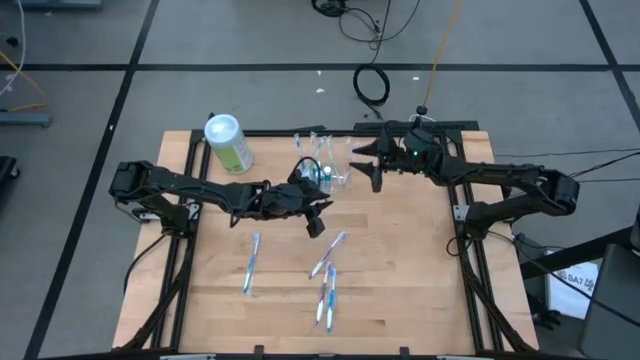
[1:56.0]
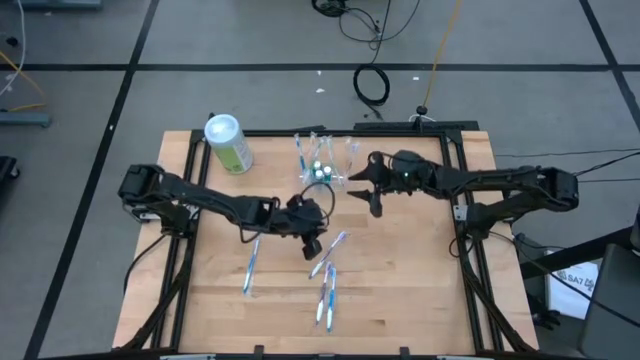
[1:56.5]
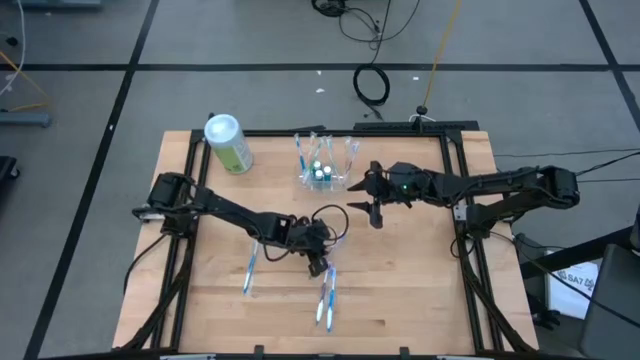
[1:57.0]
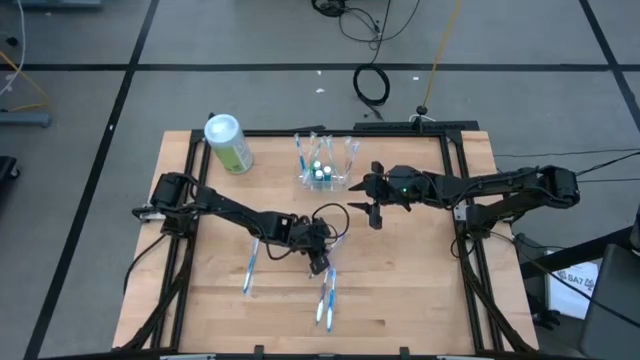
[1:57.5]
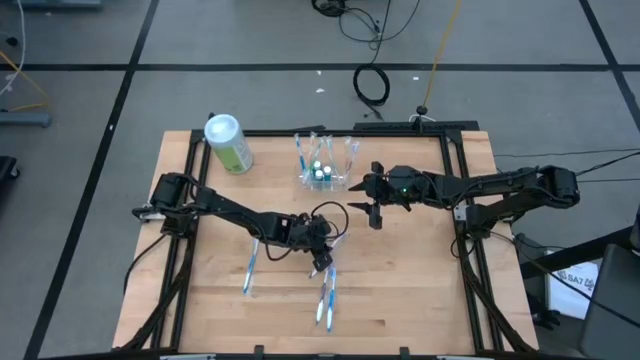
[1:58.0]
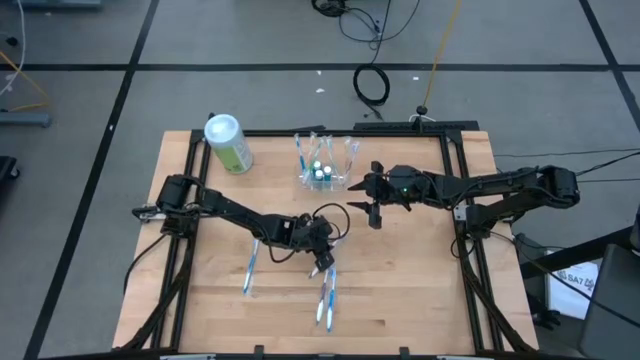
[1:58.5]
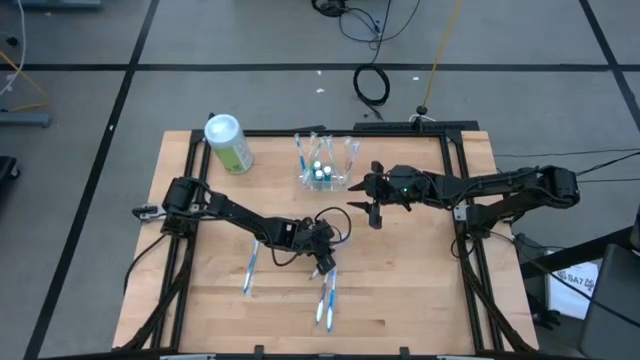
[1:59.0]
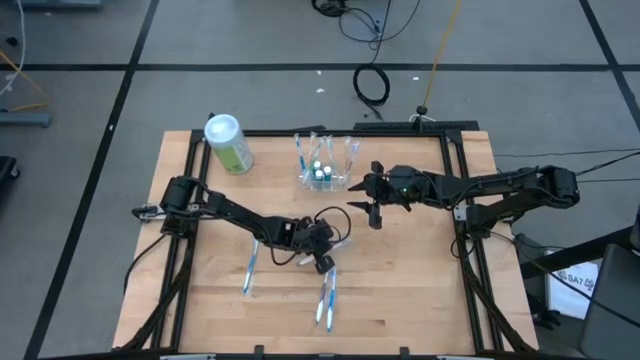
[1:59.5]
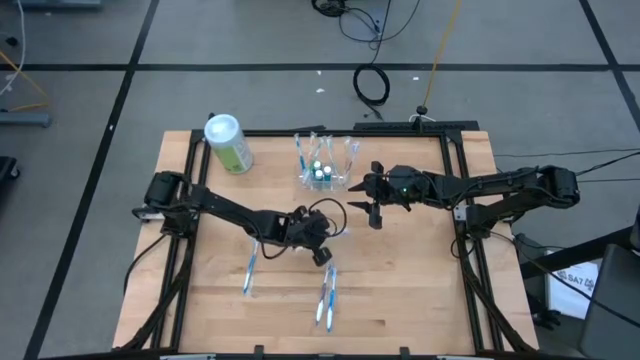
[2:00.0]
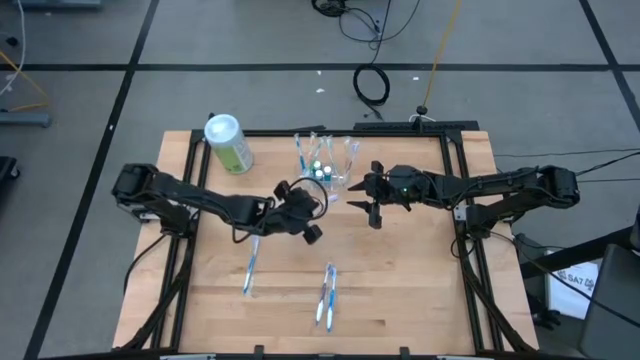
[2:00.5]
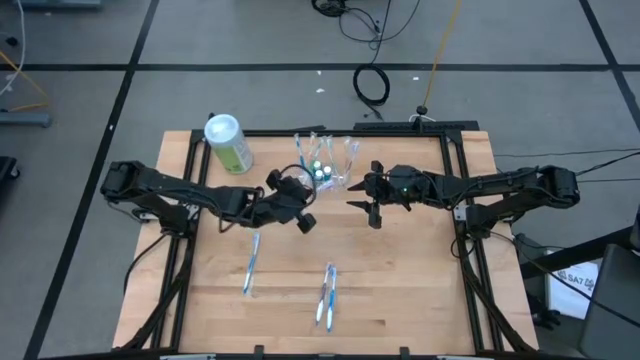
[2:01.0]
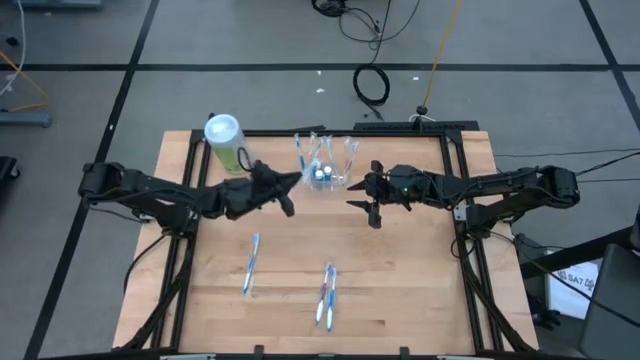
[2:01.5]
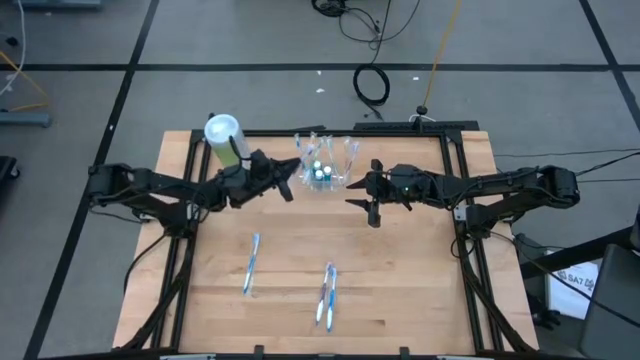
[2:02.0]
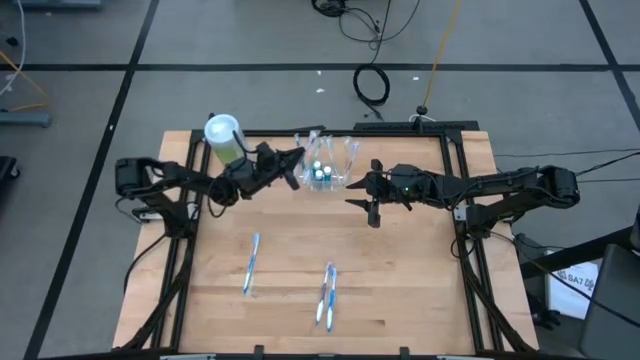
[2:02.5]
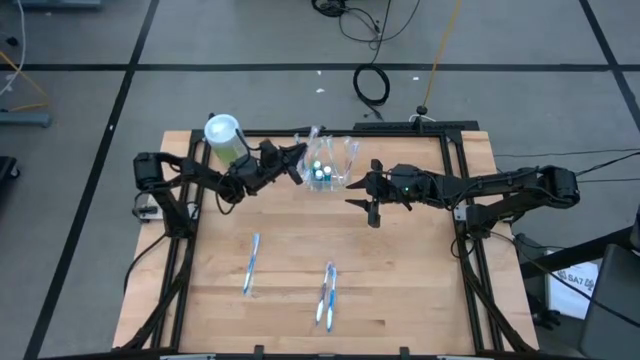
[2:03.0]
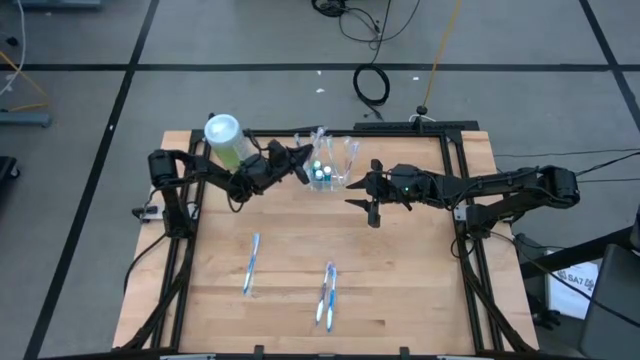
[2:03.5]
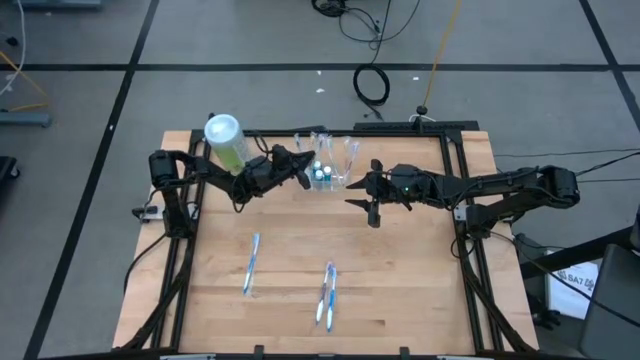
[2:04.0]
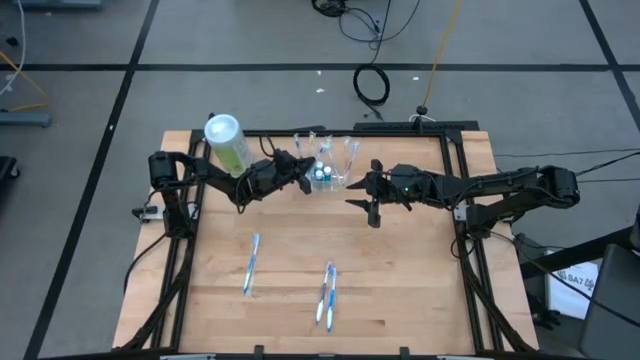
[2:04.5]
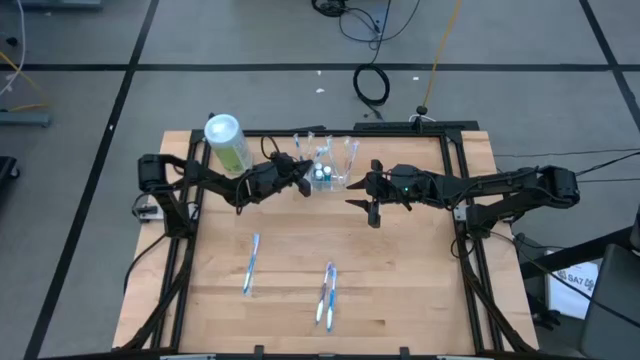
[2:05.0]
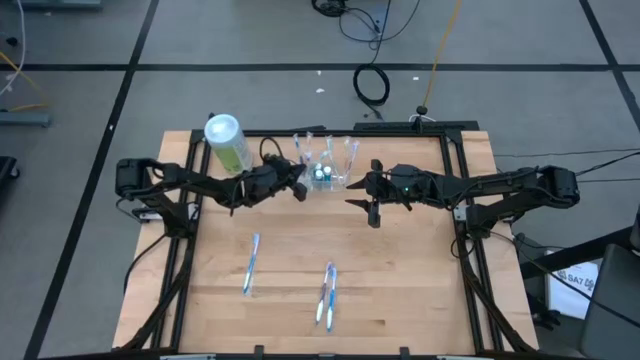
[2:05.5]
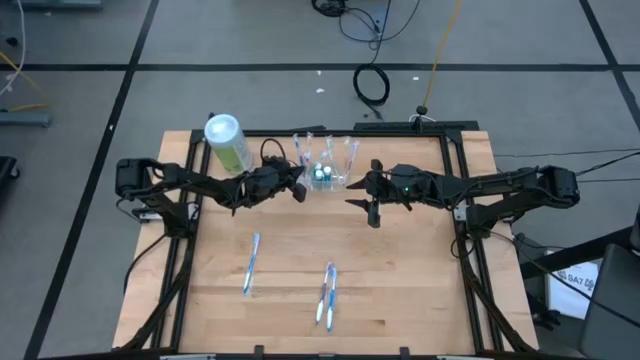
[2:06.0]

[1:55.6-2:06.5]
Task: Pick & Place toothbrushing station
Put the top purple toothbrush into the transparent organizer

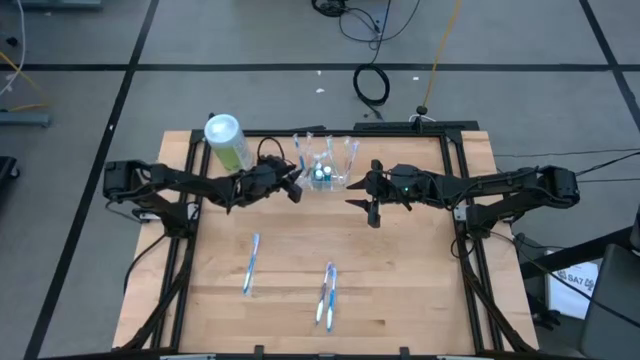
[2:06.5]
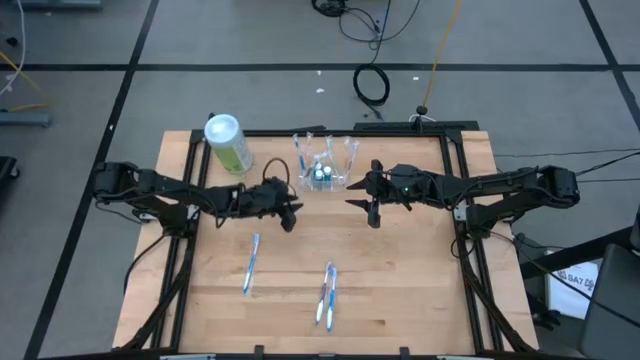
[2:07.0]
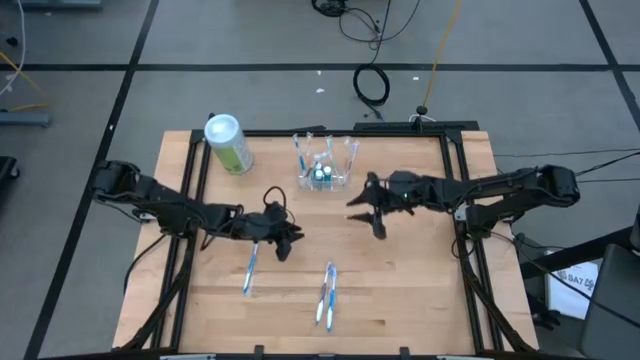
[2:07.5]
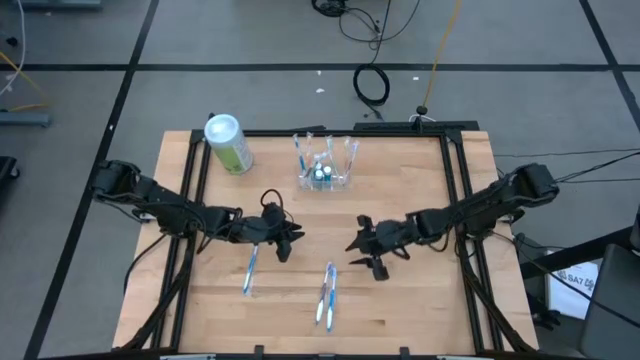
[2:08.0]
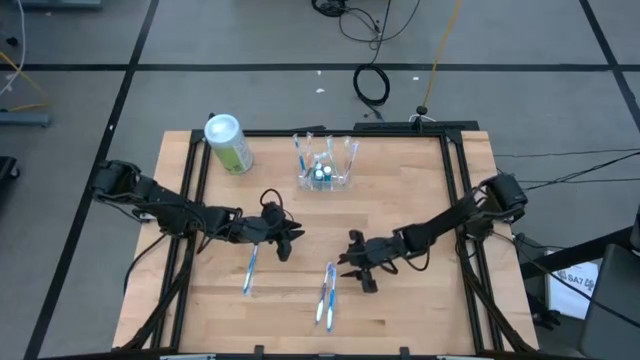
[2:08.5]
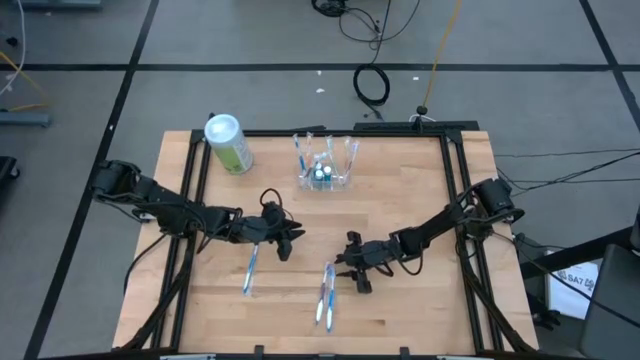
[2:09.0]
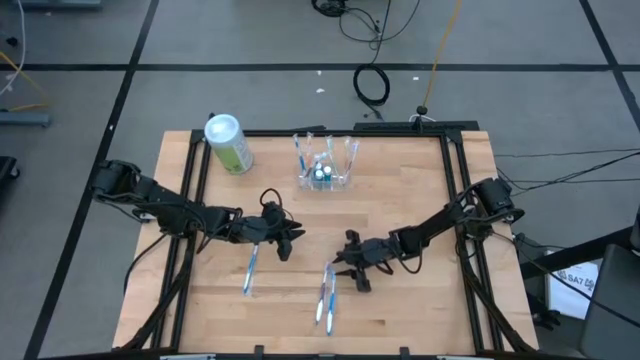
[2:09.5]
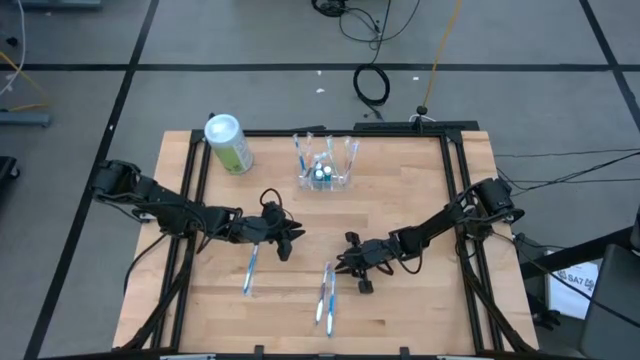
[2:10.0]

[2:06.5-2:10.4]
Put the right blue toothbrush into the transparent organizer

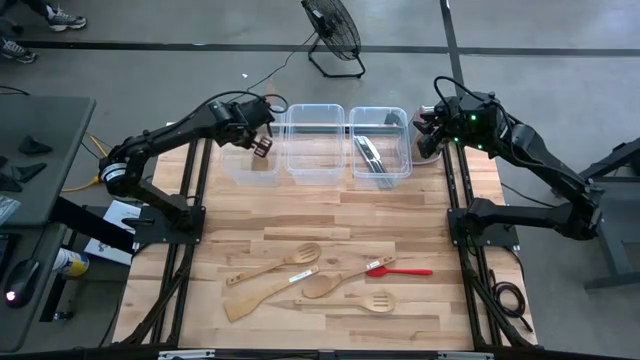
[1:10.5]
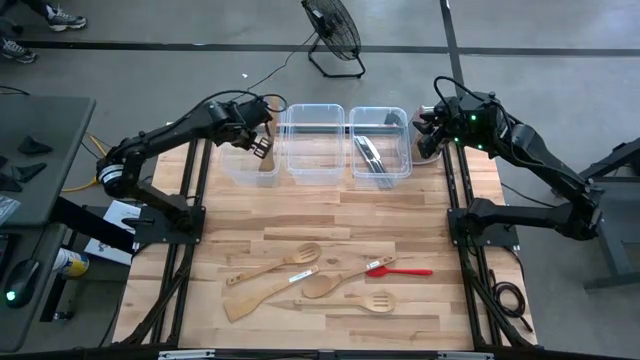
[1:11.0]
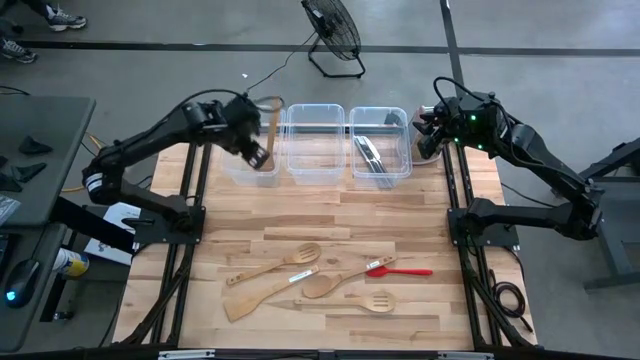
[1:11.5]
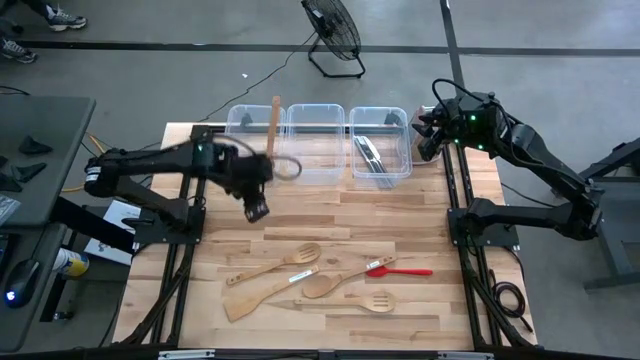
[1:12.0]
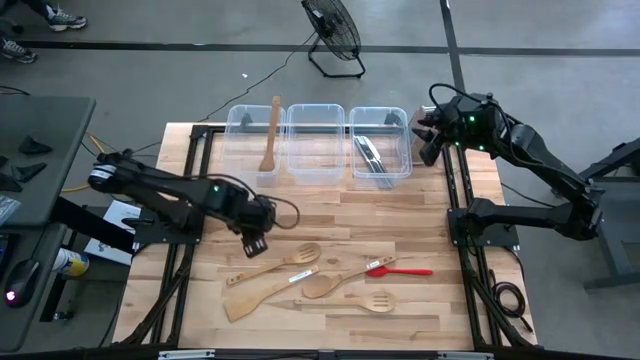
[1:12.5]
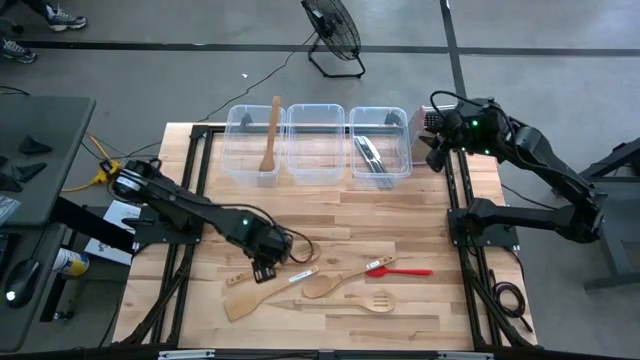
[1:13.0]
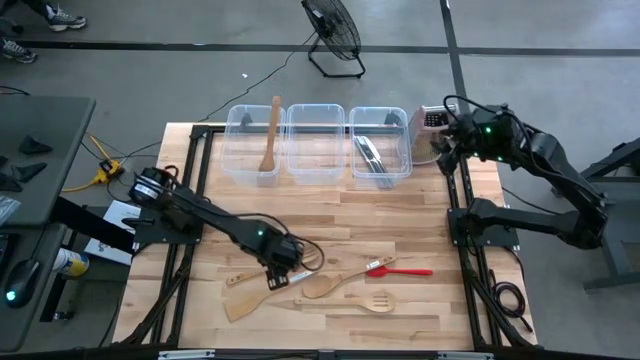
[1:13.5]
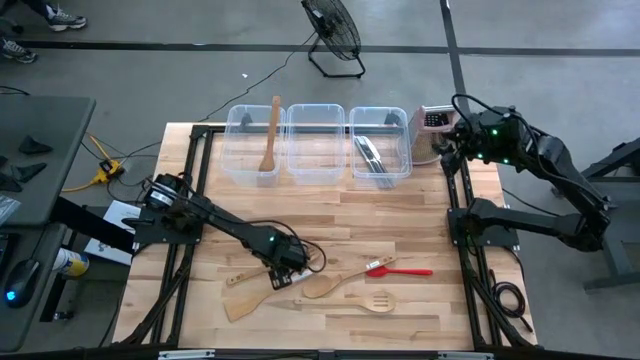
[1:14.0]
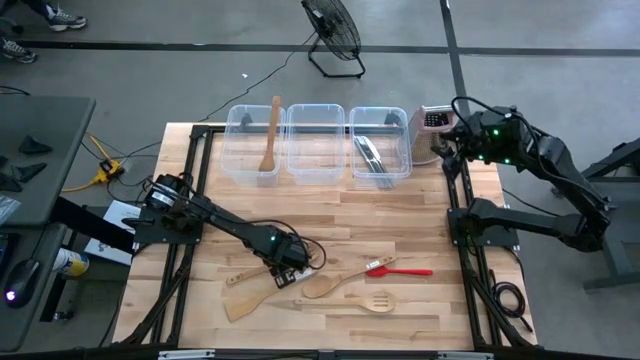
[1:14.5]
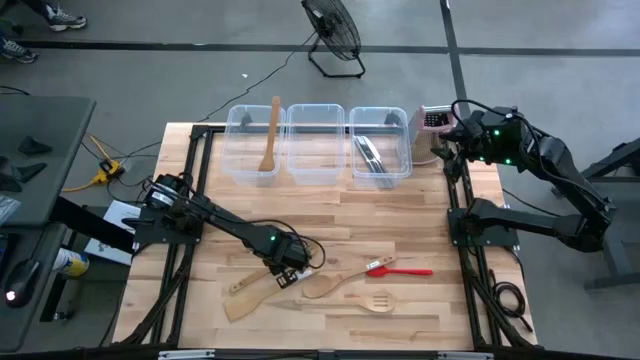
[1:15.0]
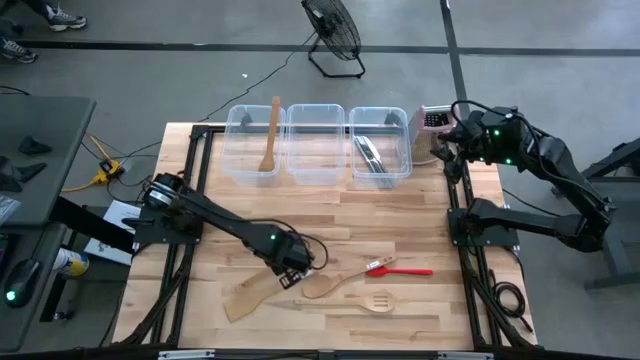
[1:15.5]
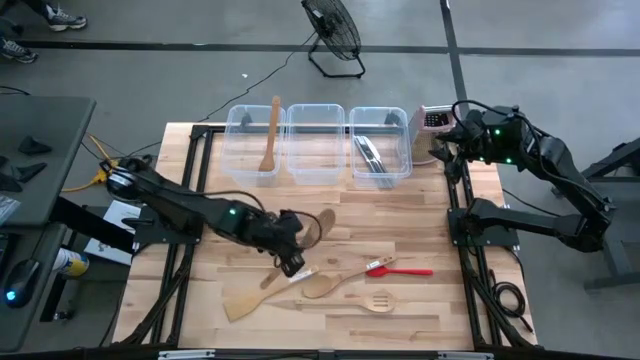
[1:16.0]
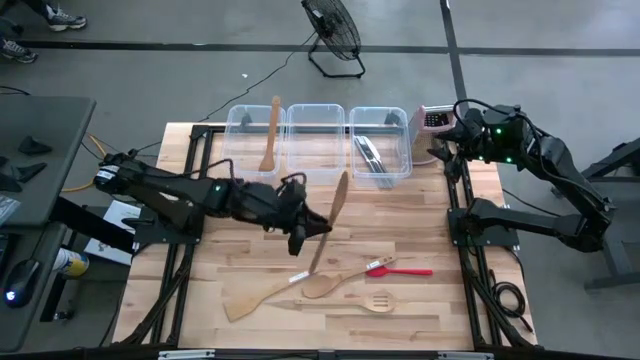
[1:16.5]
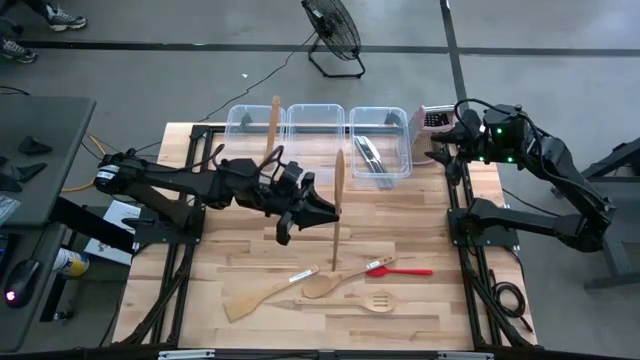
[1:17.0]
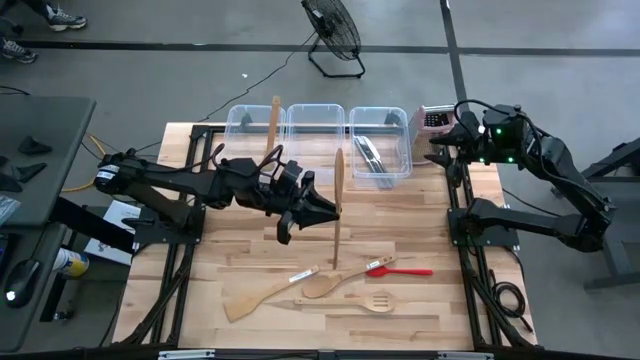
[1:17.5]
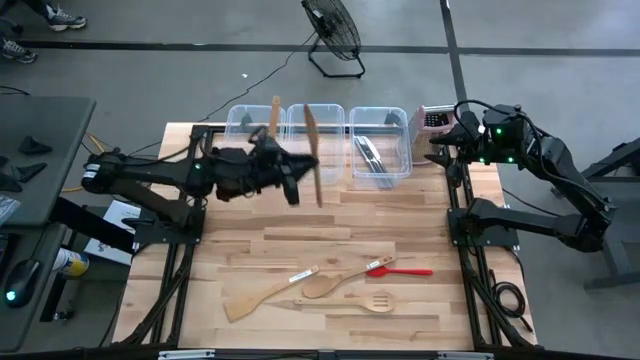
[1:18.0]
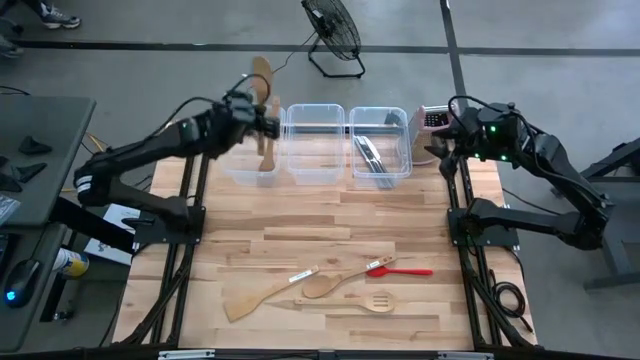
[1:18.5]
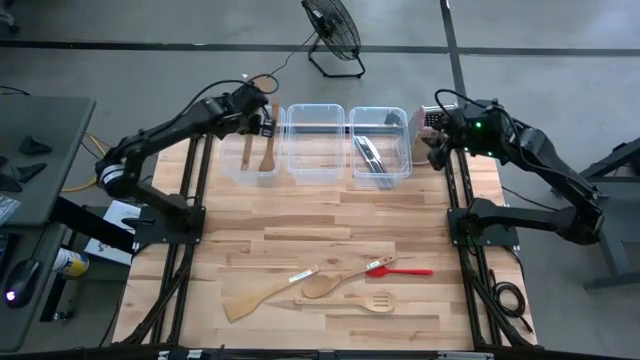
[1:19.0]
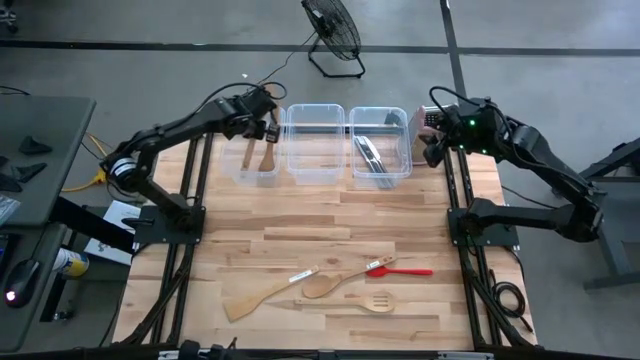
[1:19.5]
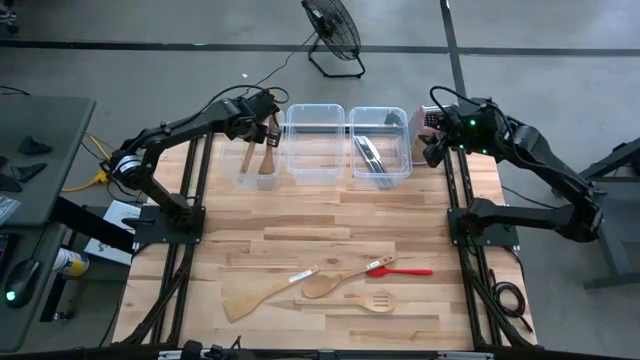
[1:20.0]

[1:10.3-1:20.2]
Task: Pick & Place Kitchen Items
Put the wooden slotted serving spoon into the left transparent bin
